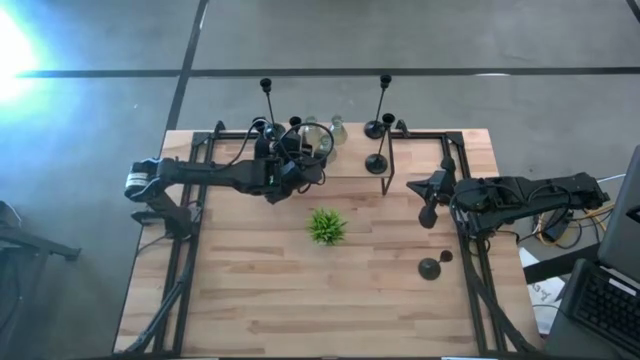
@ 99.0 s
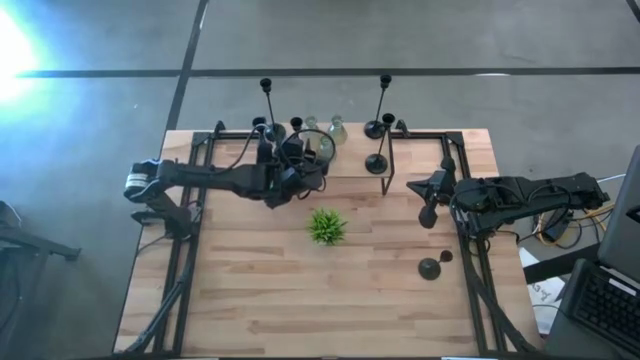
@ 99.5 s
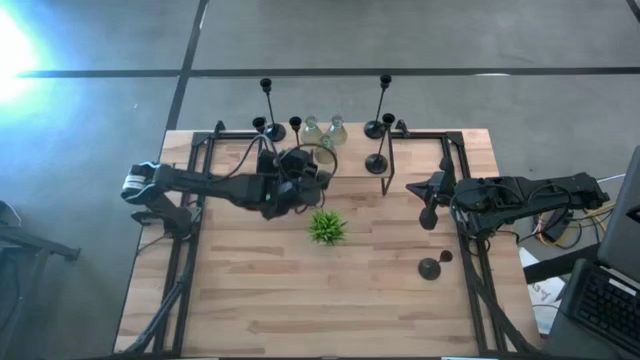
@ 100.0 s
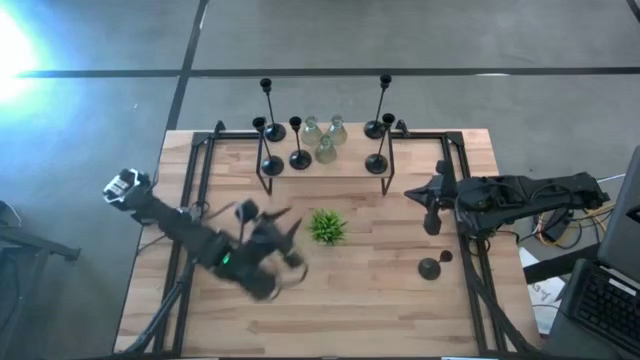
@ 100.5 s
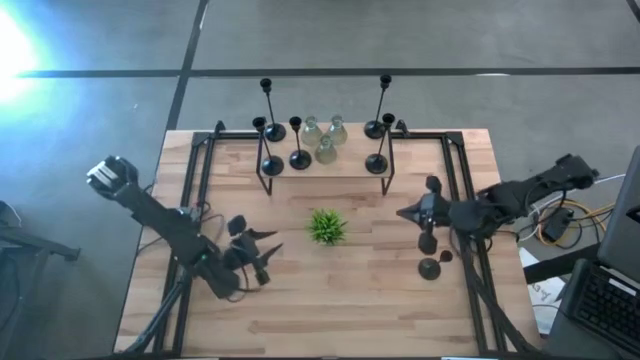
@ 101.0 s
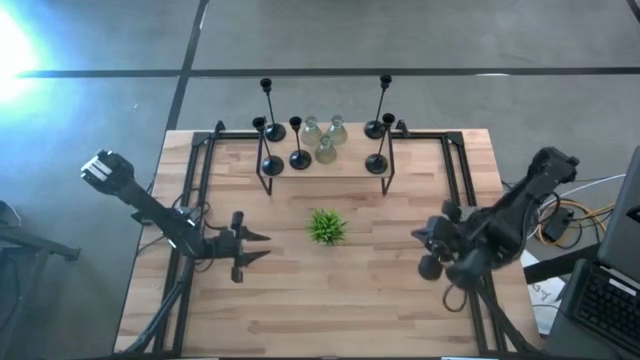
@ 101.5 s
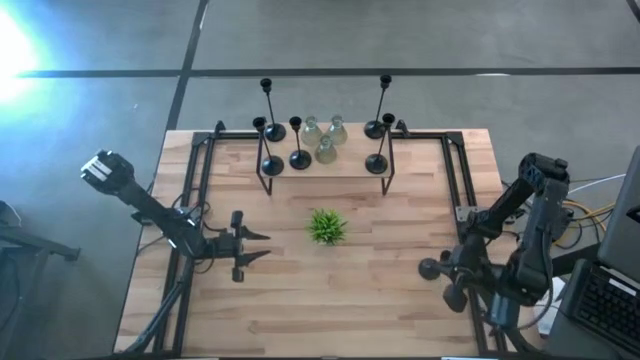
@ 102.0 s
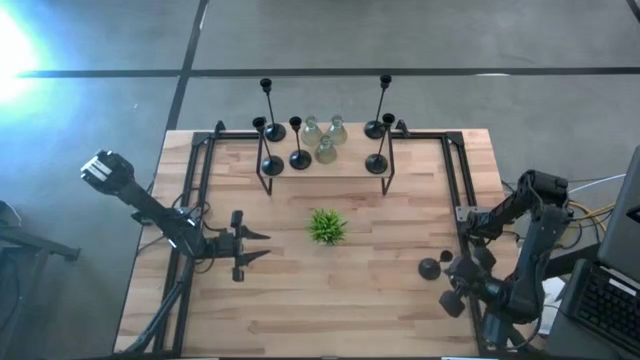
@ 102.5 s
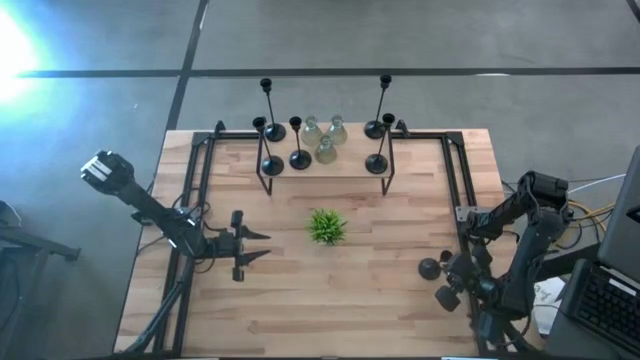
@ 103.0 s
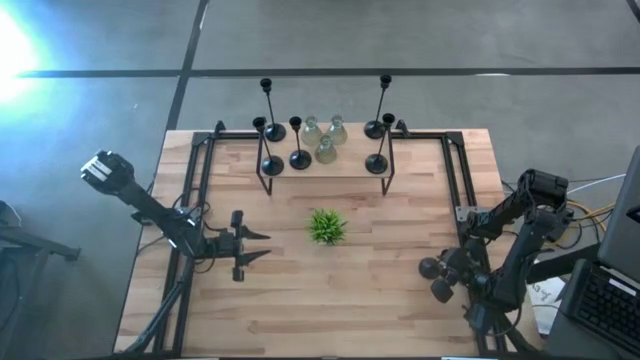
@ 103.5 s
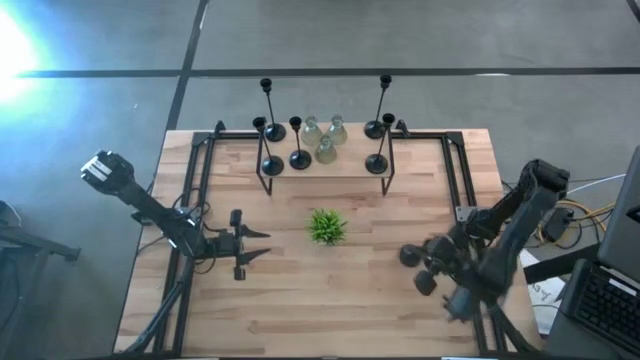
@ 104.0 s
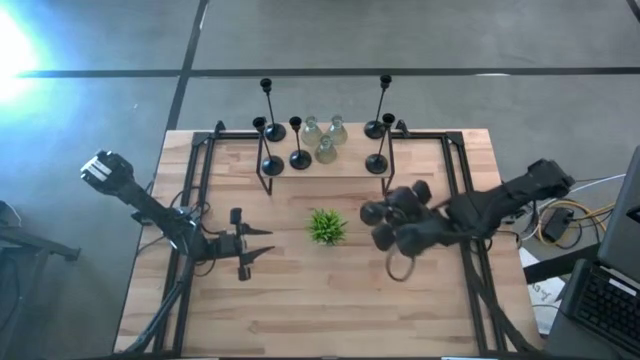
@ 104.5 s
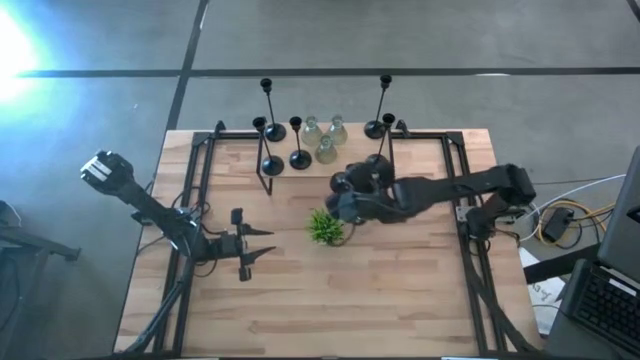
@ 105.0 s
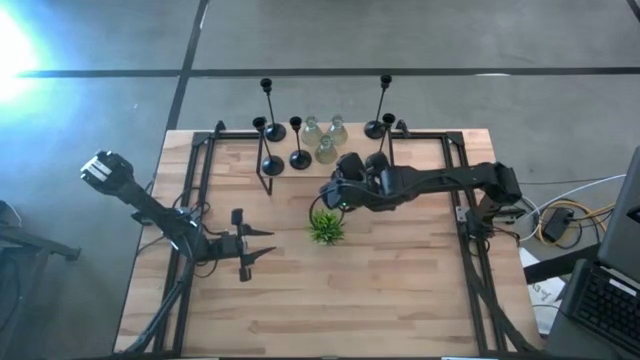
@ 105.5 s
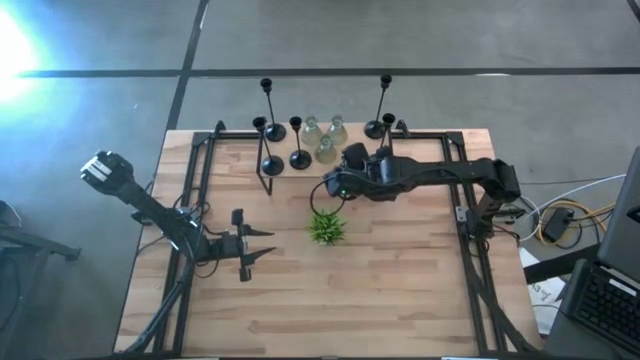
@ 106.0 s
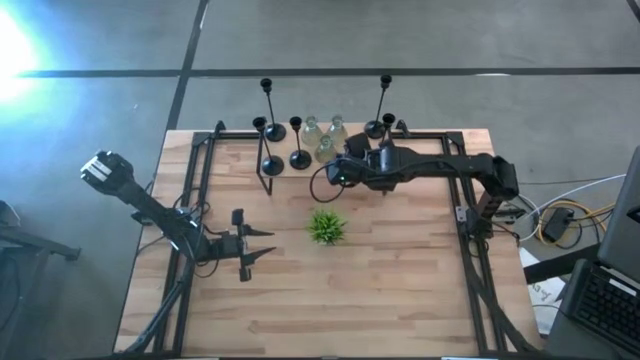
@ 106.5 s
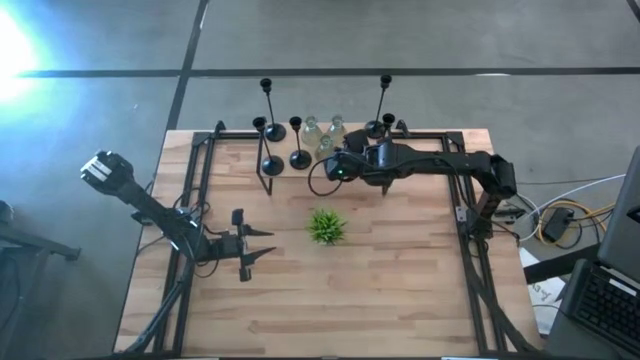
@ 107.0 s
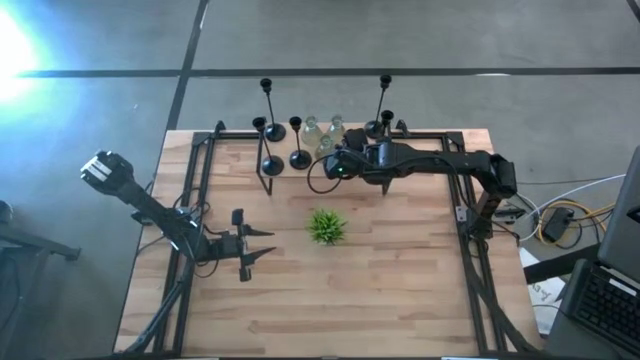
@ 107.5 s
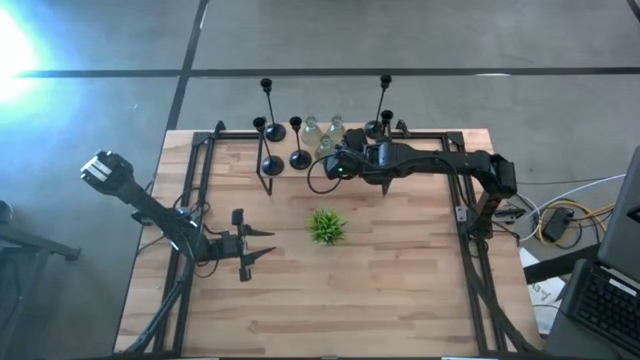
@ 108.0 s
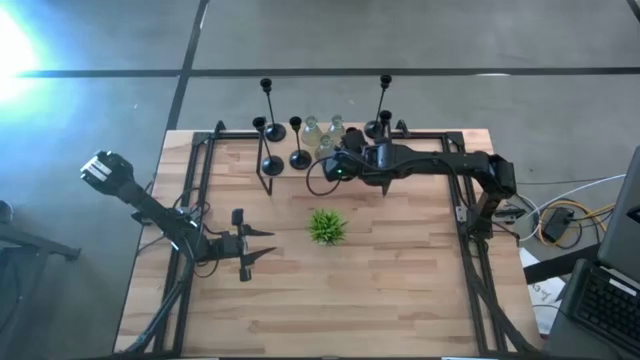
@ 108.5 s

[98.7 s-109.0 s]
Task: Pick & Place candle stick holders
Put the black candlestick holder on the shelf

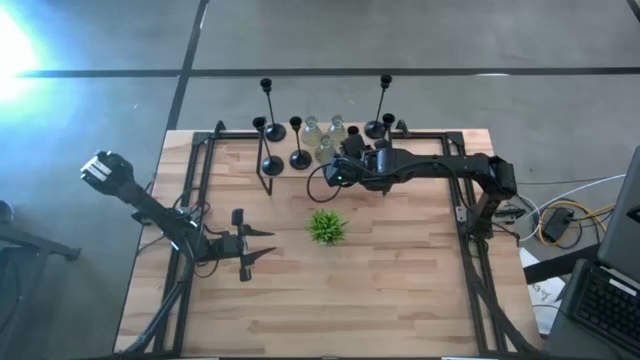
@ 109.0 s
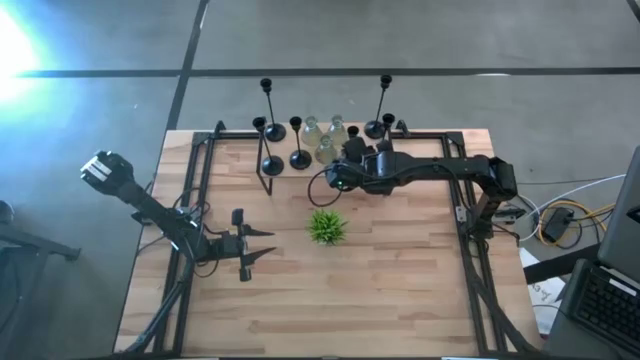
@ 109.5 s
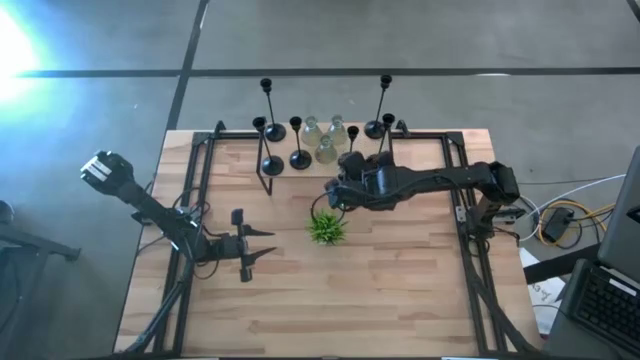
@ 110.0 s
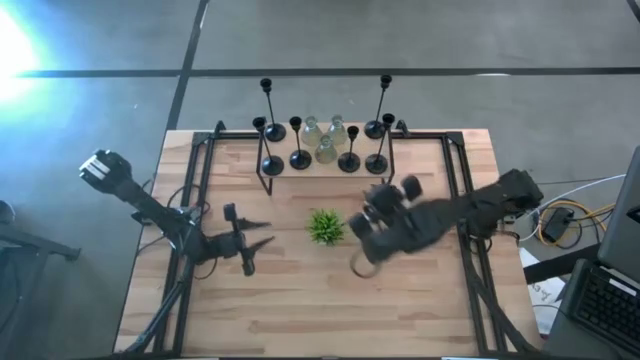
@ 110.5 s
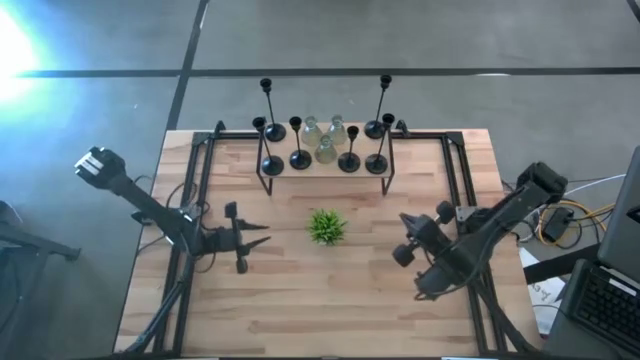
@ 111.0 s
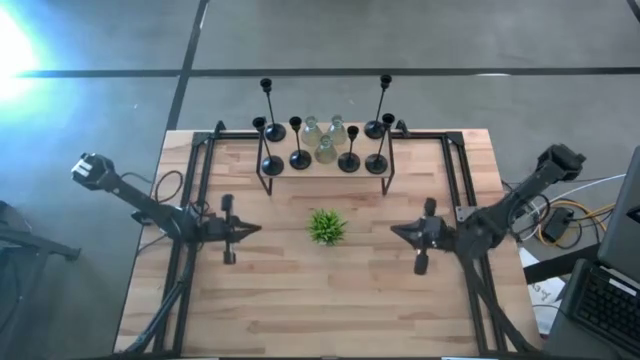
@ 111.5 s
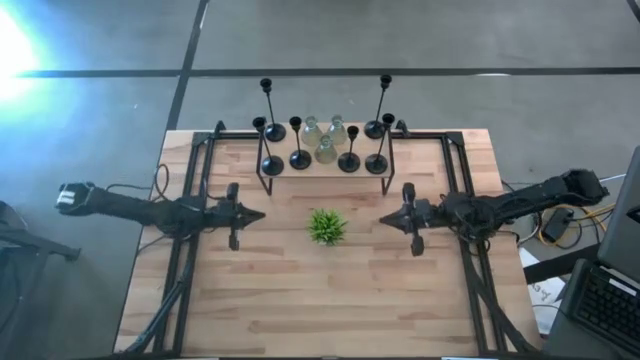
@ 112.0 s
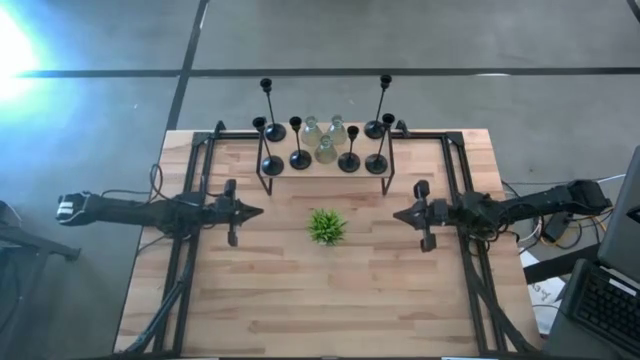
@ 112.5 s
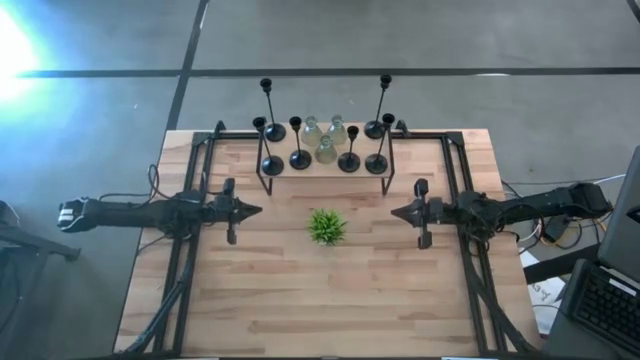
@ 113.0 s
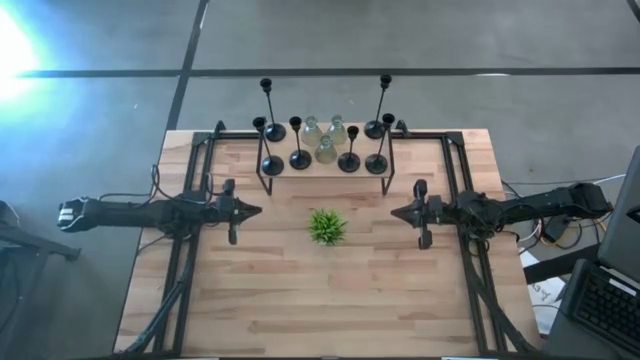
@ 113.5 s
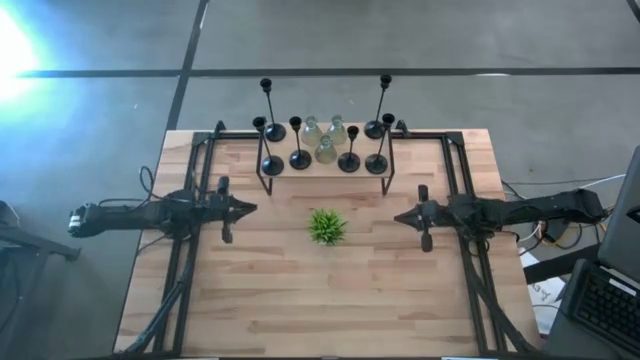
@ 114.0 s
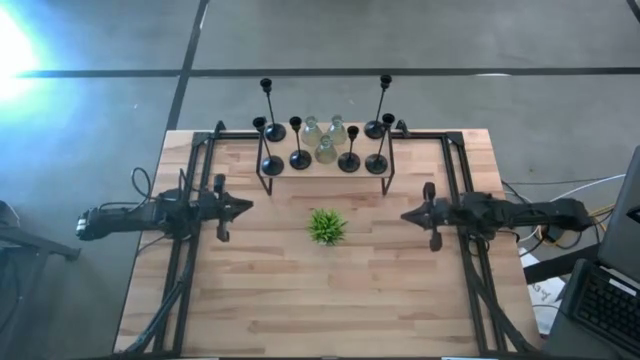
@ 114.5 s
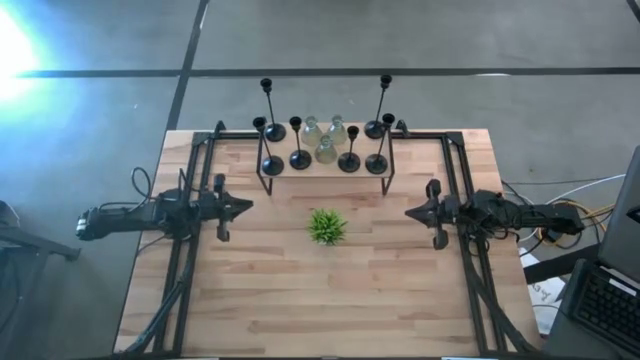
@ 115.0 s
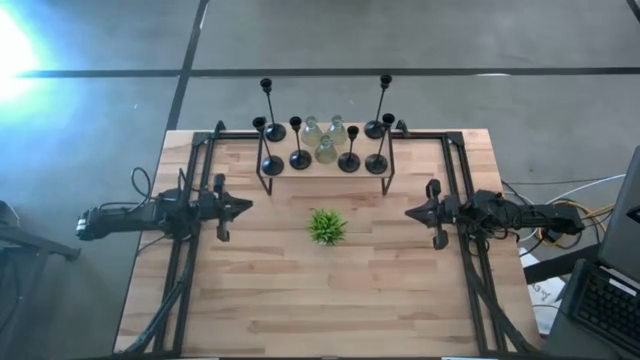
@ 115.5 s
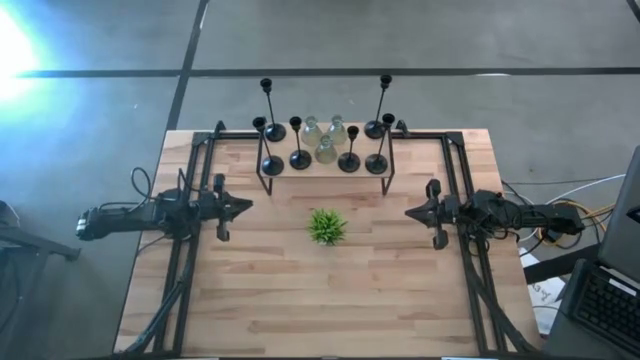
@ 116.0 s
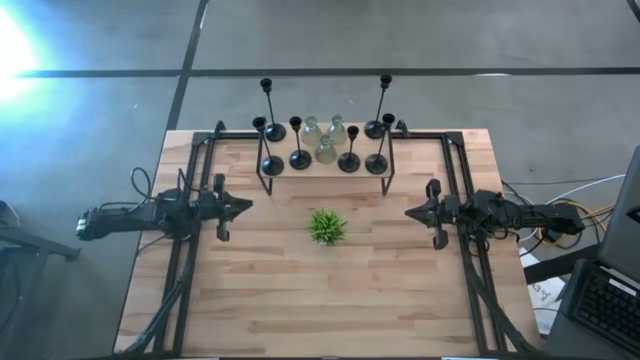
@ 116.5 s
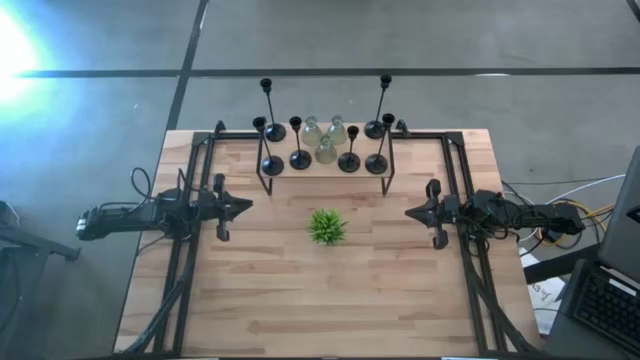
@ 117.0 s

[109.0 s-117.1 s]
Return to Home Position
